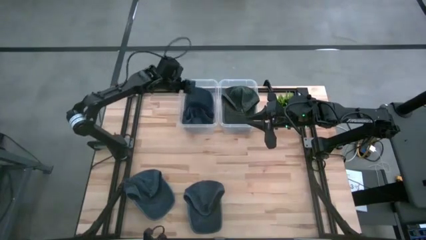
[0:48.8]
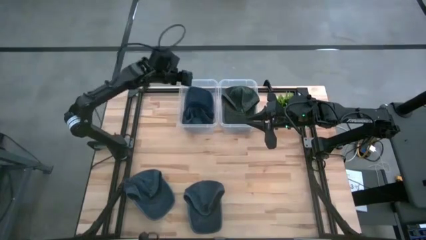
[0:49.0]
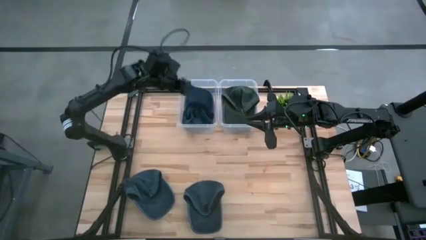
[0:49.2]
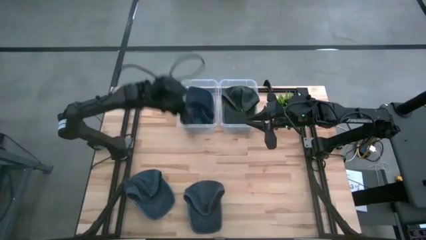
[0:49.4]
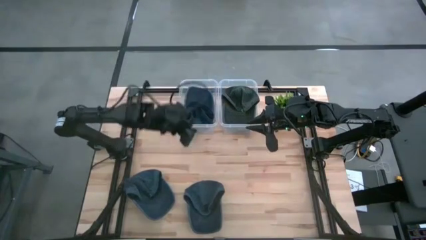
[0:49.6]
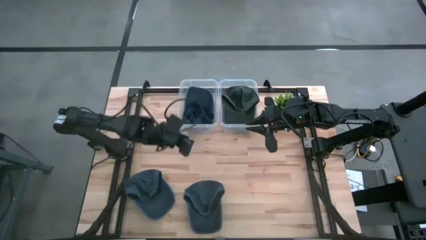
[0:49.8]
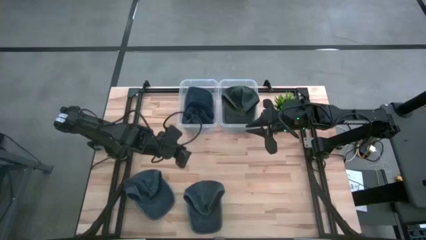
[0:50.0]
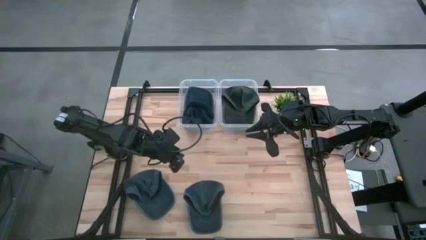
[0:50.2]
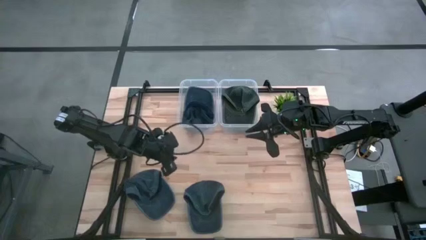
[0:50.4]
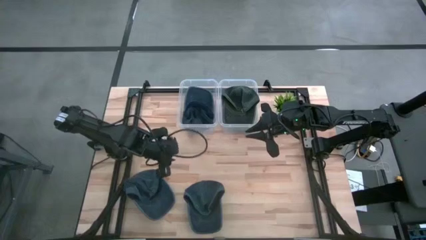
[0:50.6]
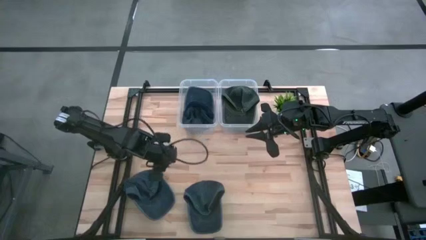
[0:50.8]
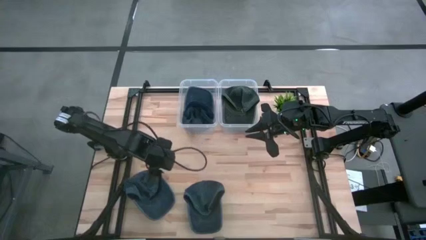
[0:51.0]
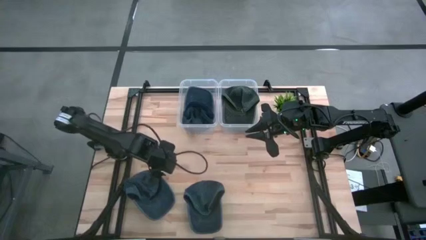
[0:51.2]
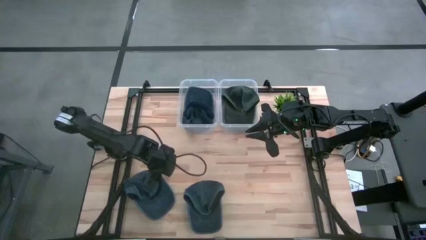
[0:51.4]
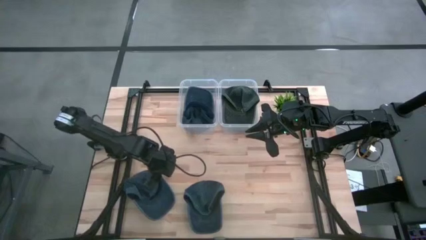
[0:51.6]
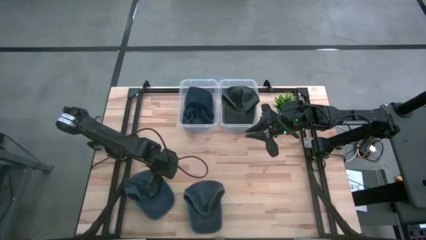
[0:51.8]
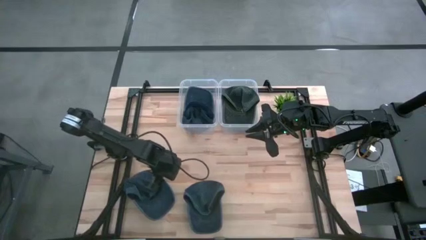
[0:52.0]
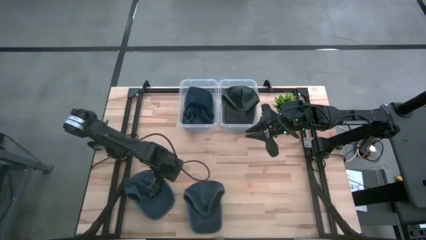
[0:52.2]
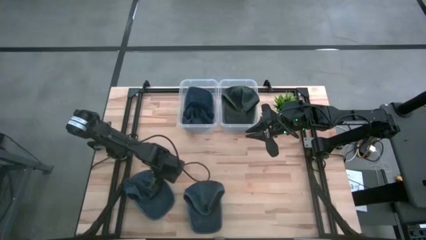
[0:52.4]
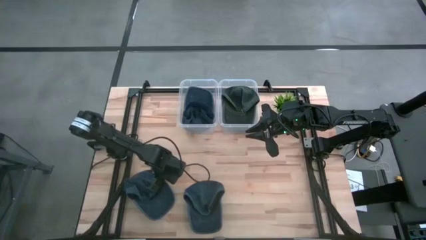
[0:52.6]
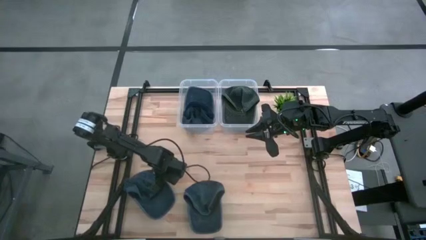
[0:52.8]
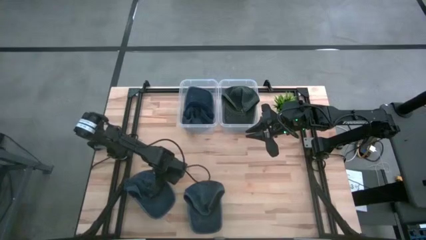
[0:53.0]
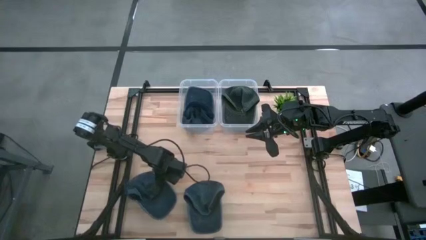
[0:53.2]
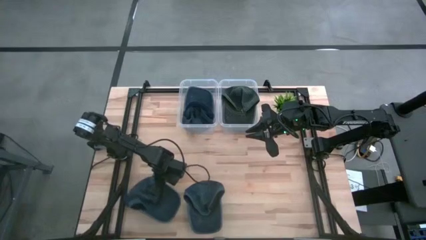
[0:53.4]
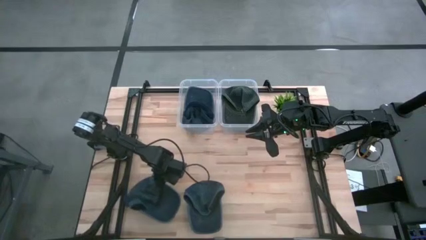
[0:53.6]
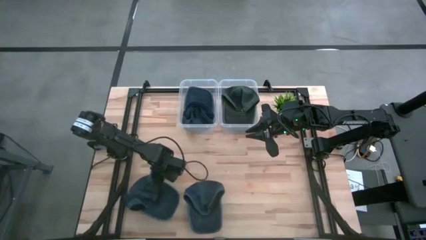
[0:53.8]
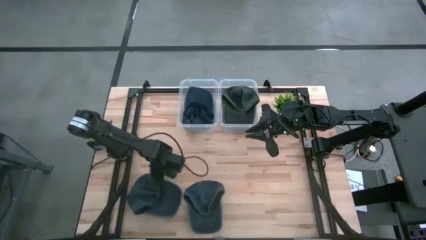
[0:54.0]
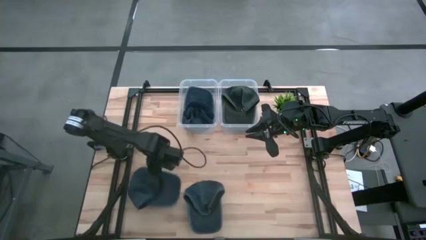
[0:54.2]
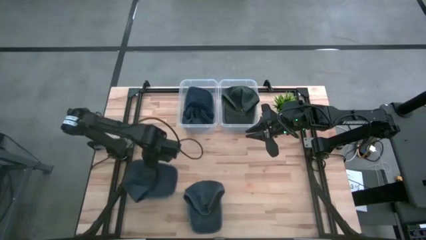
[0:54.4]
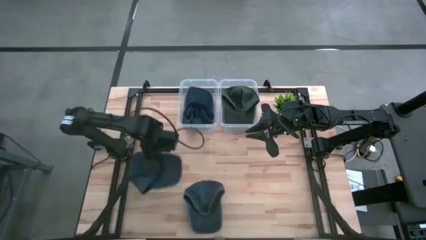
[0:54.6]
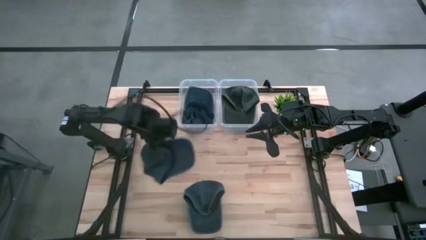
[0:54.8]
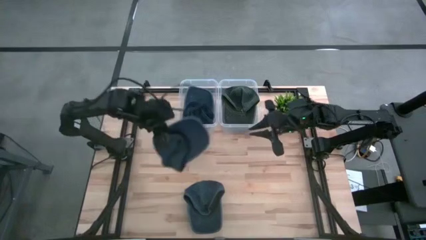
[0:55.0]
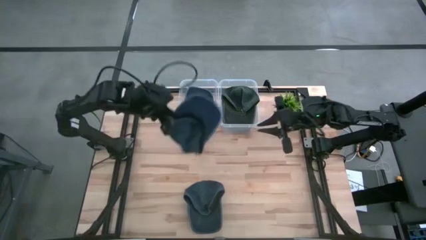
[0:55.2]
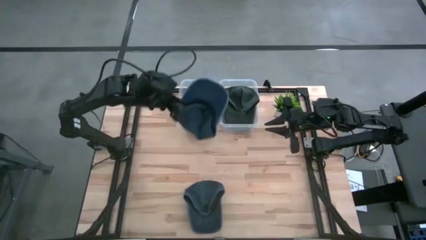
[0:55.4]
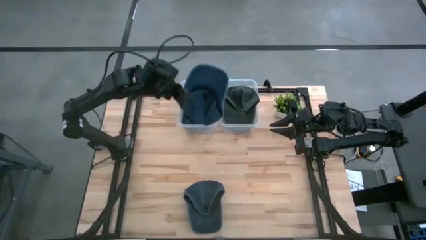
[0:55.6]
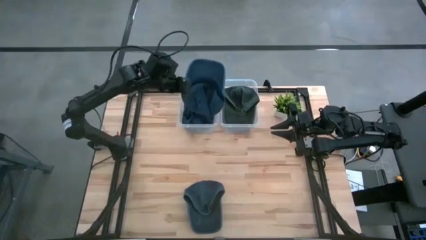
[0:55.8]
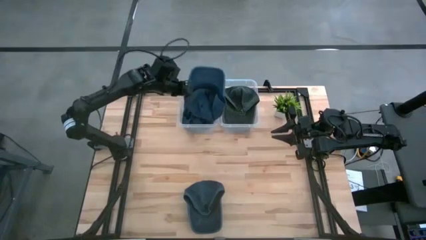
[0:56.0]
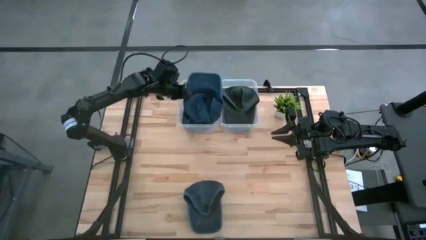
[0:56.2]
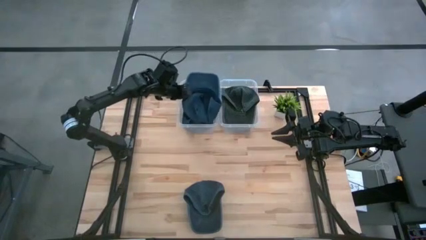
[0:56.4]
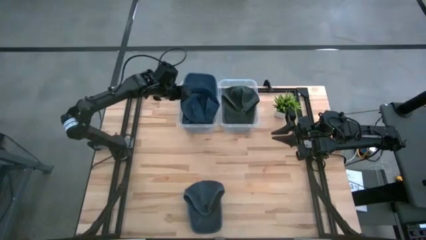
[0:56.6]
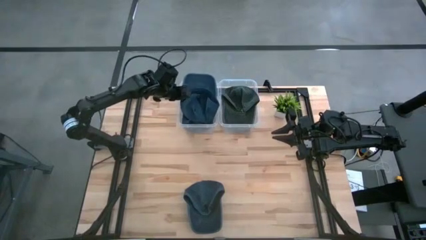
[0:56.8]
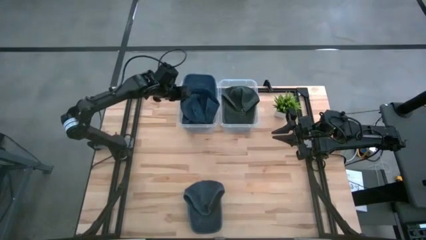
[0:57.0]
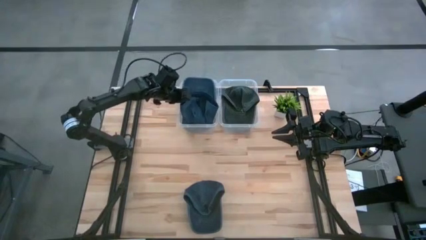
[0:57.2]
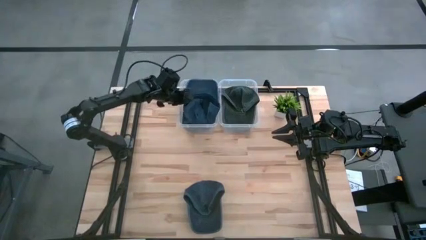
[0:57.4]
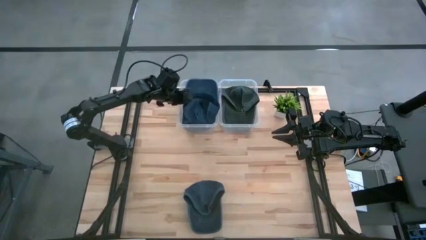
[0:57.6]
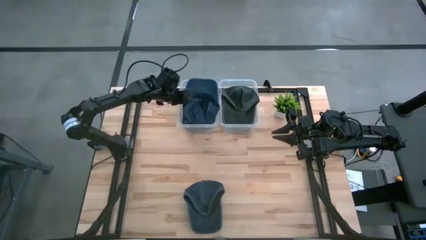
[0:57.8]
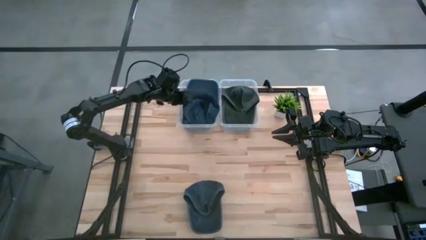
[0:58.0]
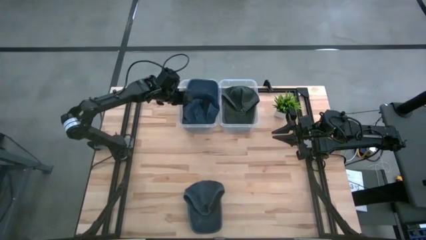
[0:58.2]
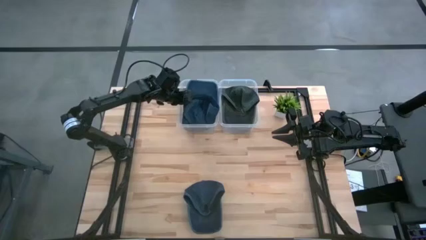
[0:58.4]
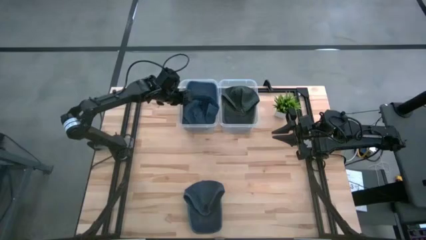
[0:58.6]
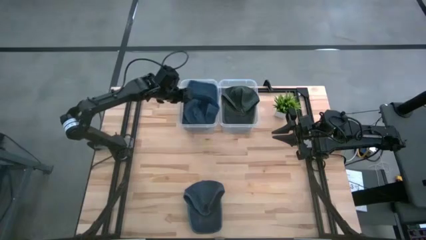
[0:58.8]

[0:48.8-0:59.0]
Task: Pick & Place hat
Put the left blue cap into the left transparent bin

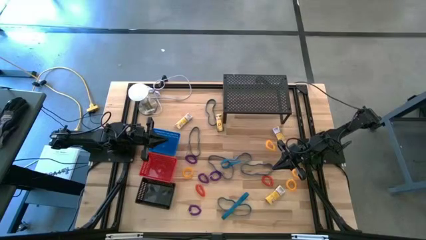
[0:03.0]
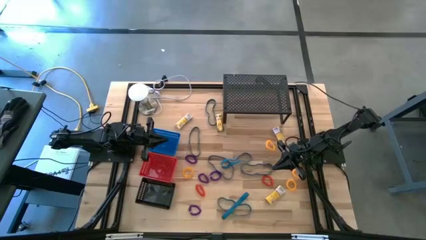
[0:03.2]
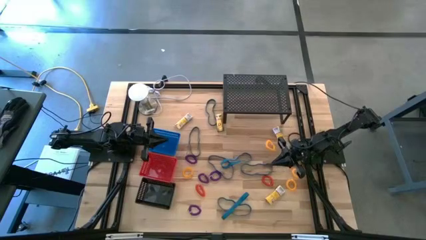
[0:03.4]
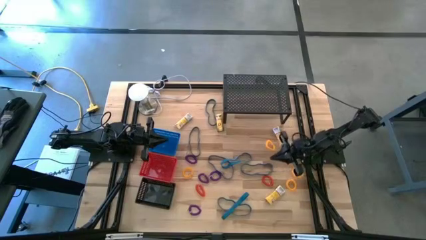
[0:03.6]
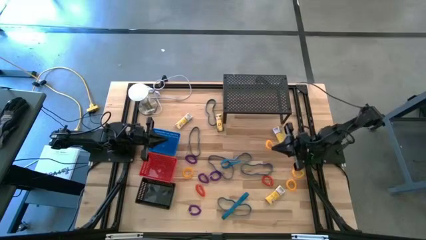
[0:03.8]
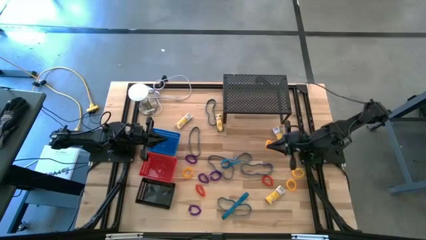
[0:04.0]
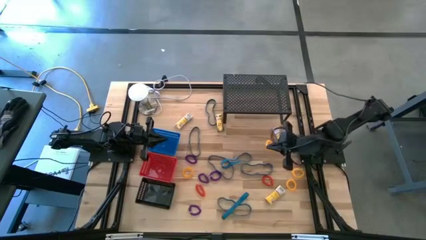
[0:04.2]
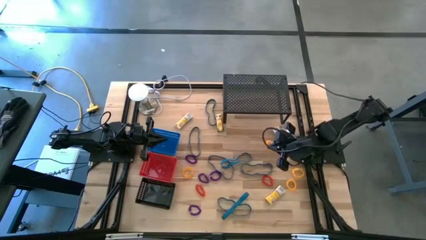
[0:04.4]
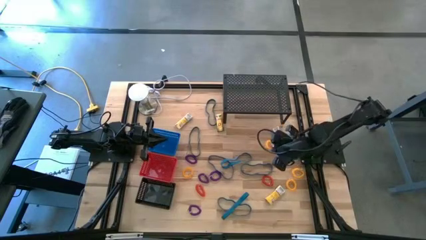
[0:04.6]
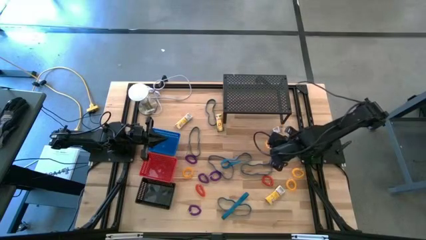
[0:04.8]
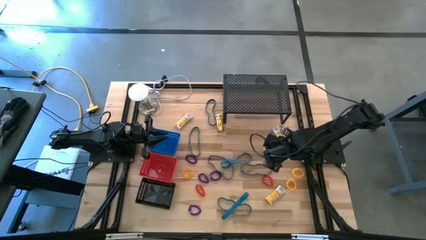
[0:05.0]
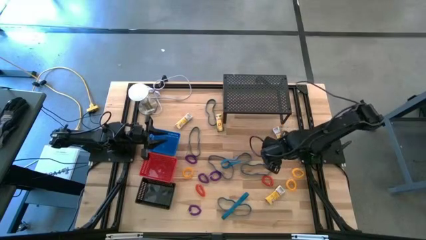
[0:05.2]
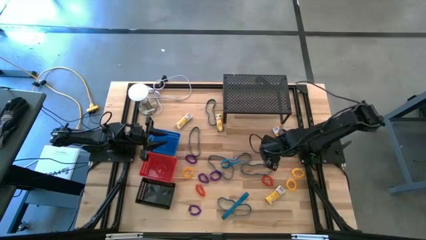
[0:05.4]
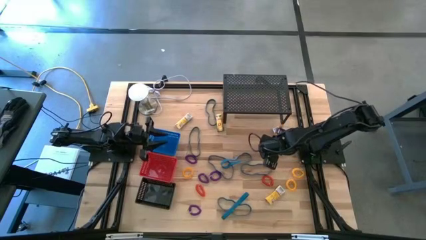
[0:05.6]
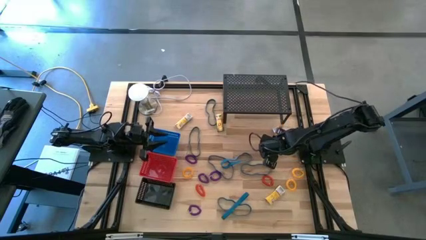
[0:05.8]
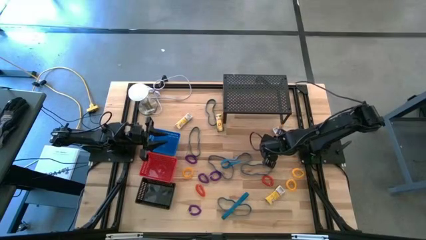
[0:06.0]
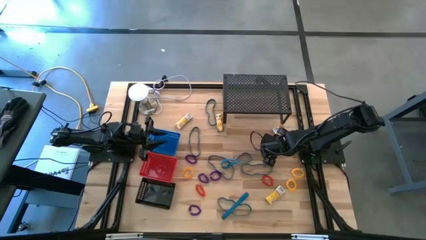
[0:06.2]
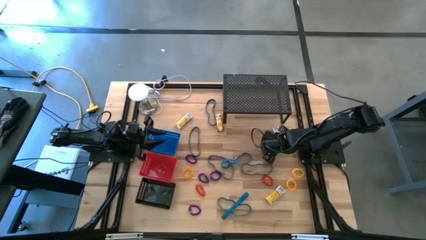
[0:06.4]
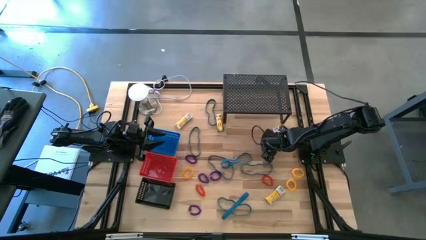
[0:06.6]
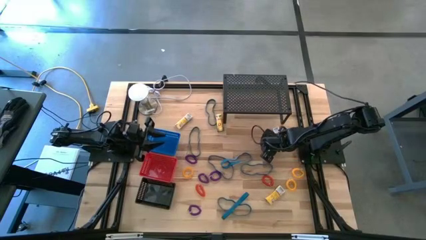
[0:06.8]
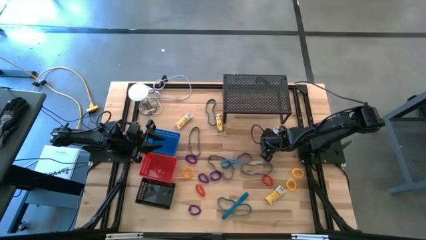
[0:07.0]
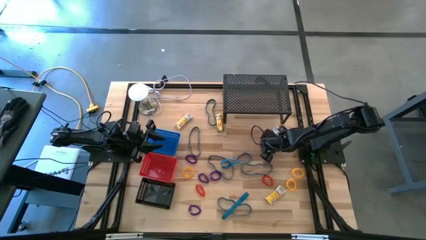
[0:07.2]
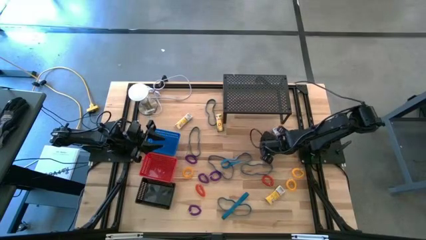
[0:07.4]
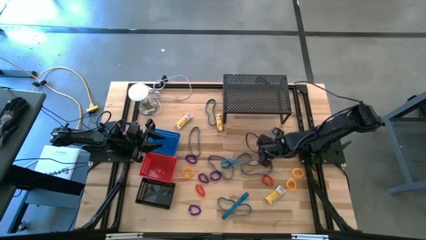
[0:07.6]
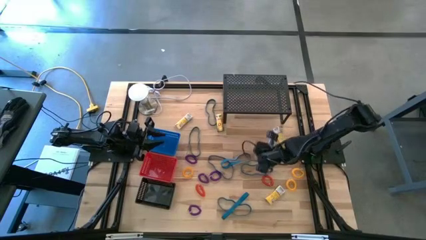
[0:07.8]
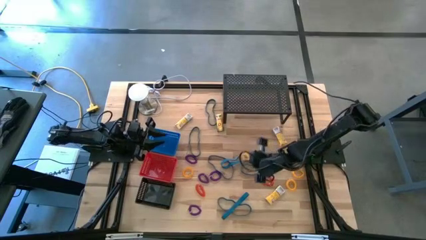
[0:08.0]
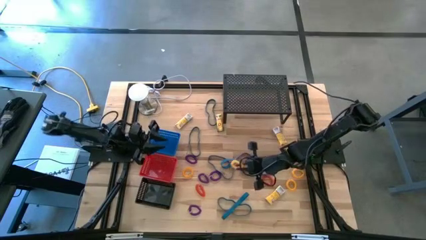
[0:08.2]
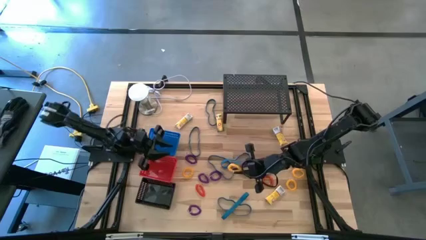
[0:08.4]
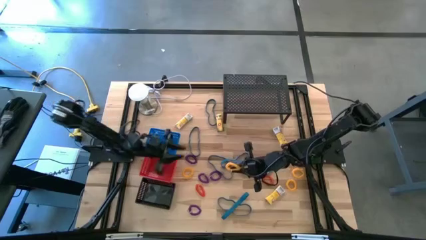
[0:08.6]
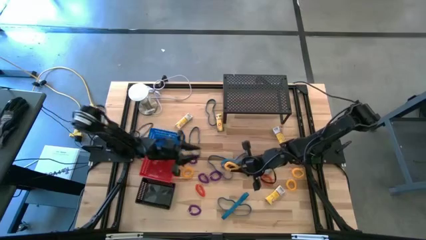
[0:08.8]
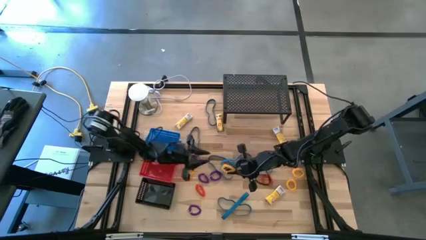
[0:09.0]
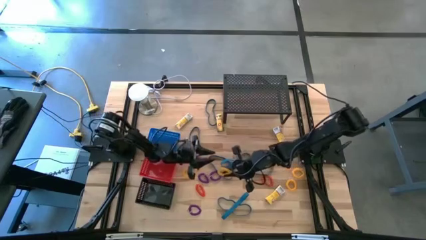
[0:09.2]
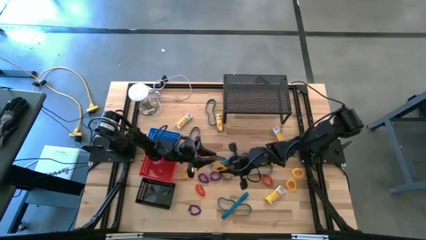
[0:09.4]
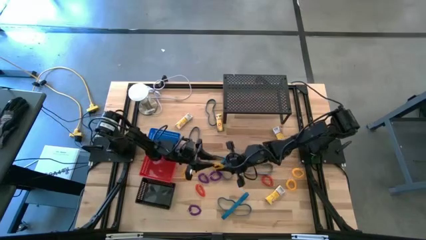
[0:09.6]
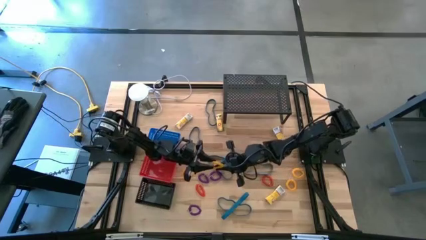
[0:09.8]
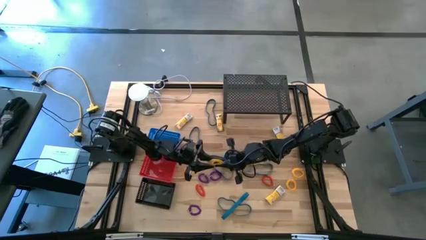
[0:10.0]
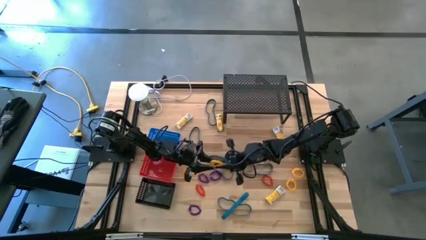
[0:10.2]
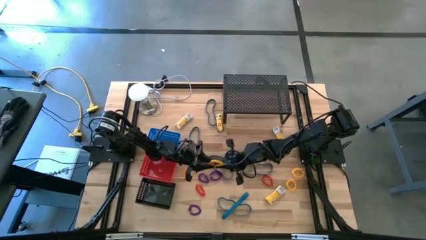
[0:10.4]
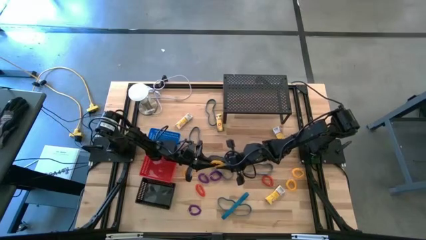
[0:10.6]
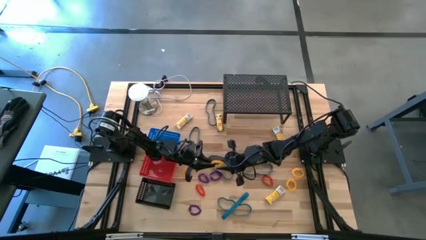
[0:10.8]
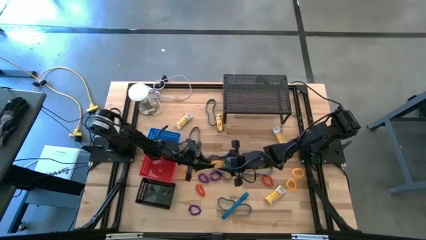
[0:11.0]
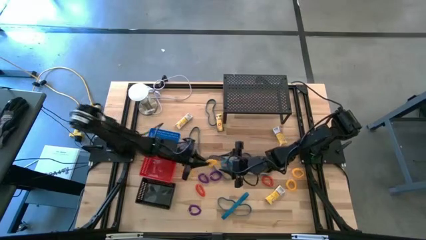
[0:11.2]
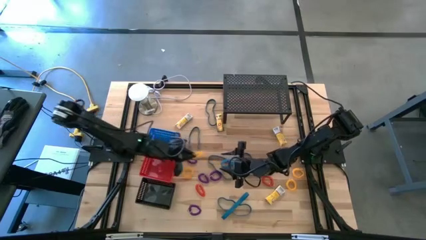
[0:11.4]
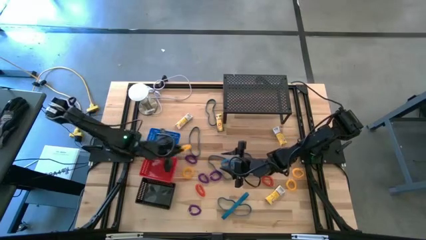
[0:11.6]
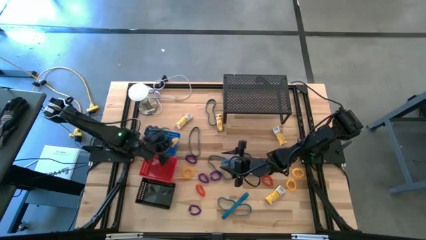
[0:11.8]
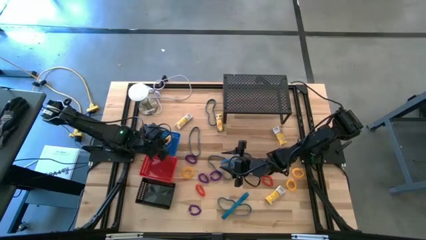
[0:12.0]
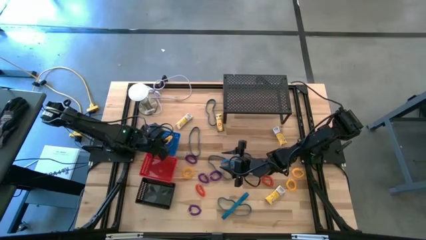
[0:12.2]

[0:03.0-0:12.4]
Task: Pick & Place Office Desk Supplies
Put the yellow spring keychain into the blue bin
